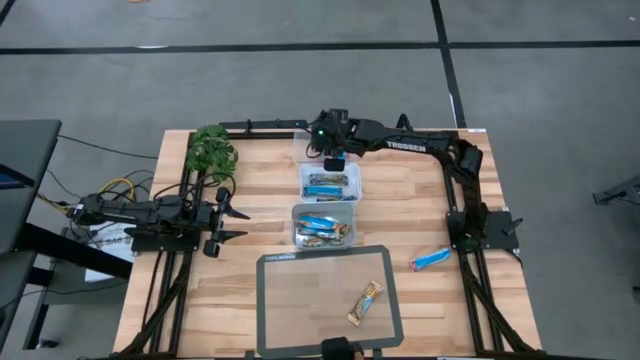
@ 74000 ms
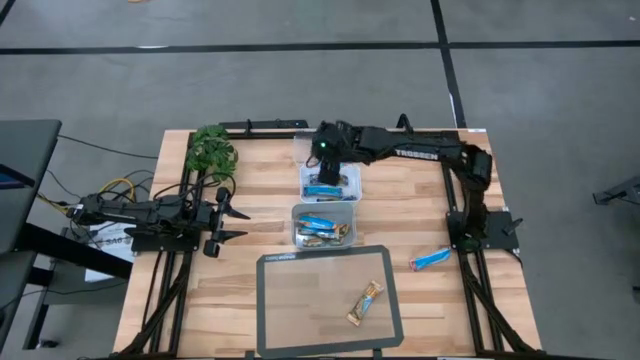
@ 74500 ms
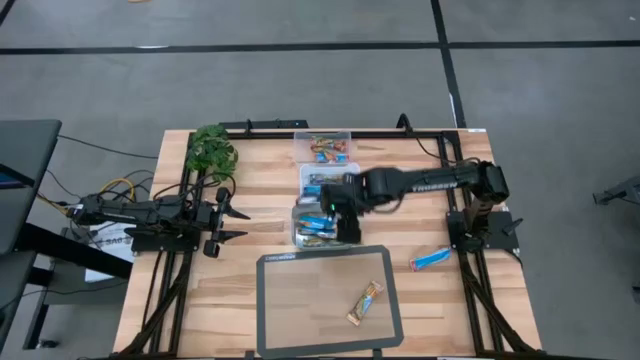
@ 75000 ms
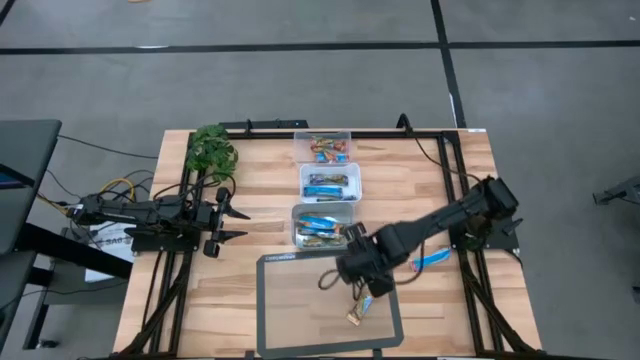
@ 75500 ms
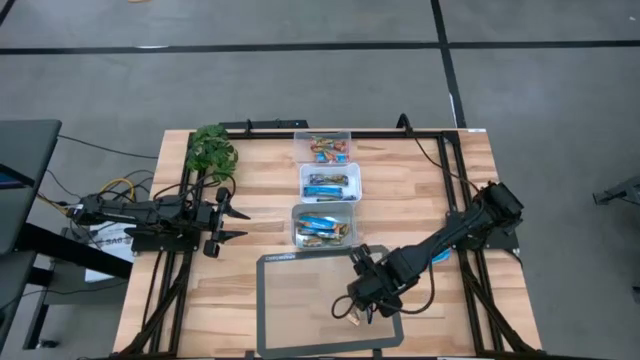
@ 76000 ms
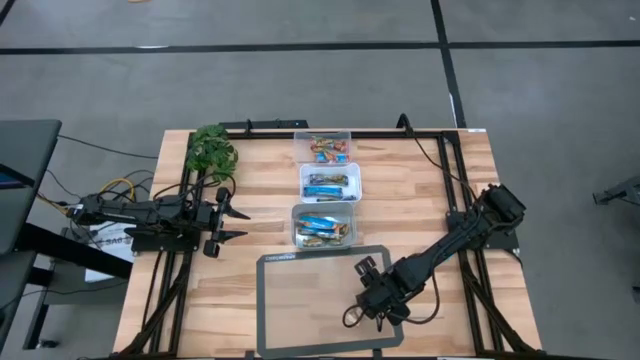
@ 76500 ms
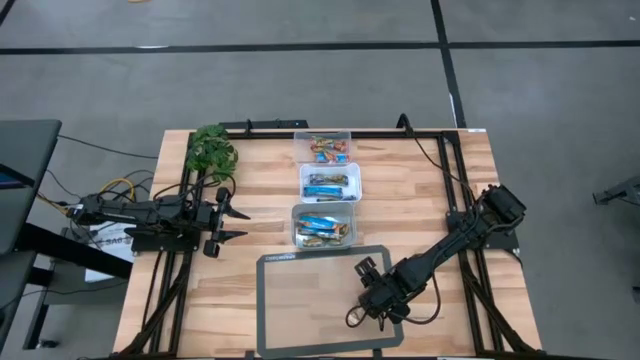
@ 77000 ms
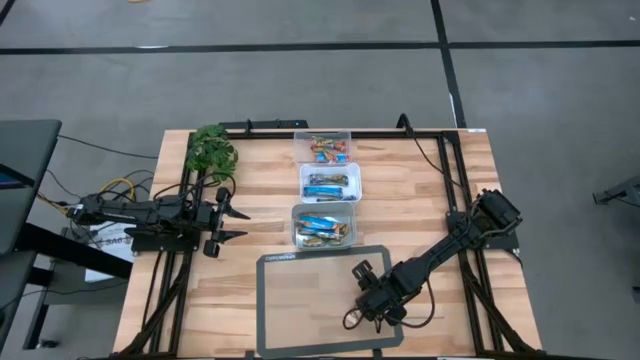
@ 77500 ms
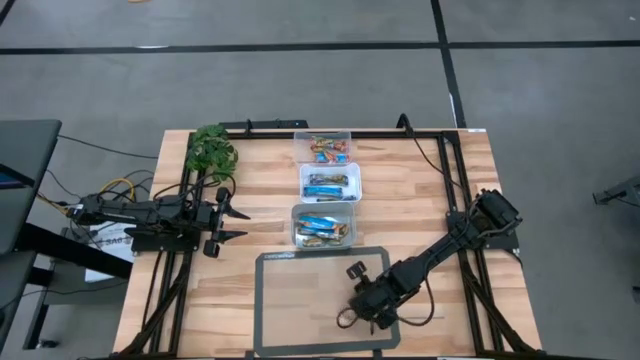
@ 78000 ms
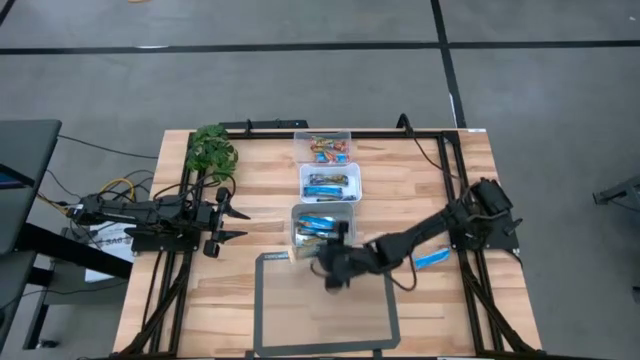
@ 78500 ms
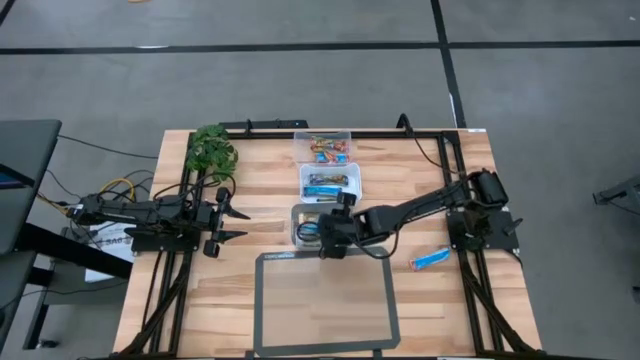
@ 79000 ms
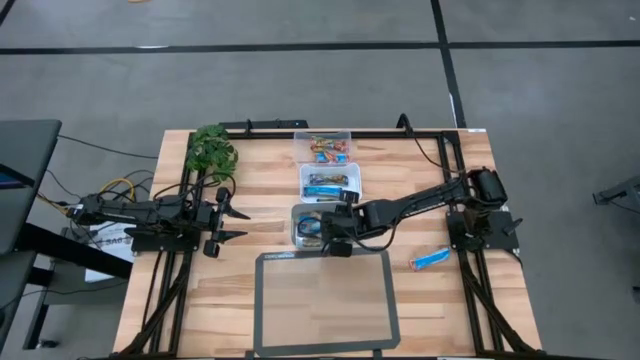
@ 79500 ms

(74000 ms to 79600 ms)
Task: Pick and place Granola Bars by type
Put the yellow granola bar into the gray bin

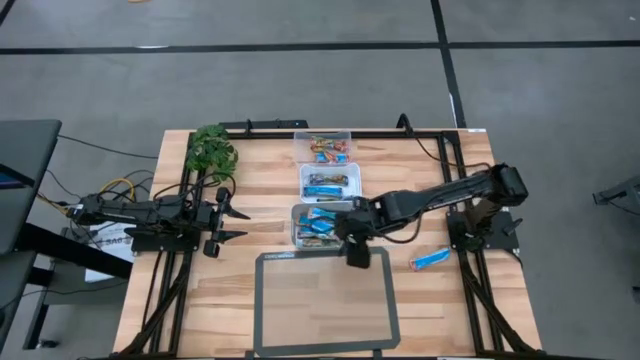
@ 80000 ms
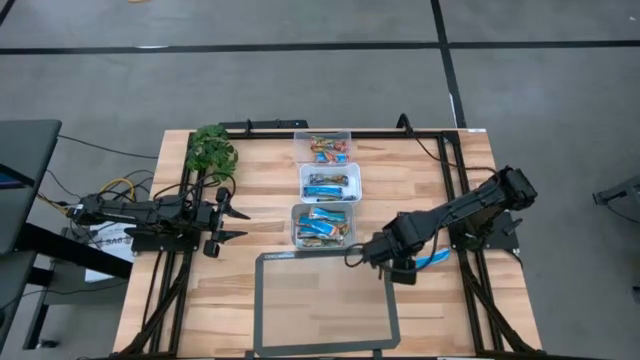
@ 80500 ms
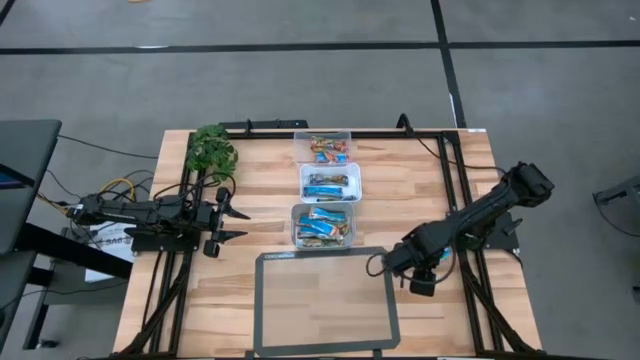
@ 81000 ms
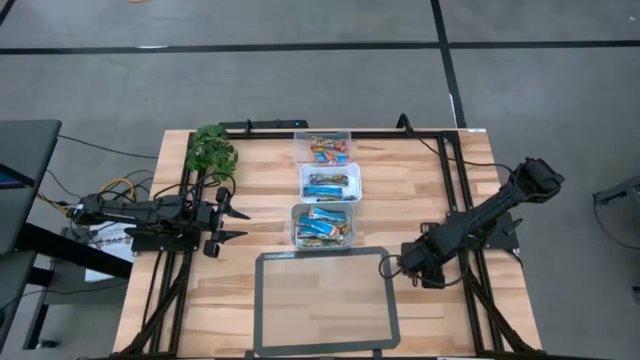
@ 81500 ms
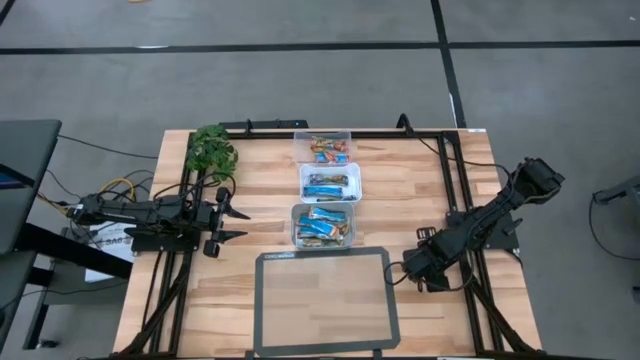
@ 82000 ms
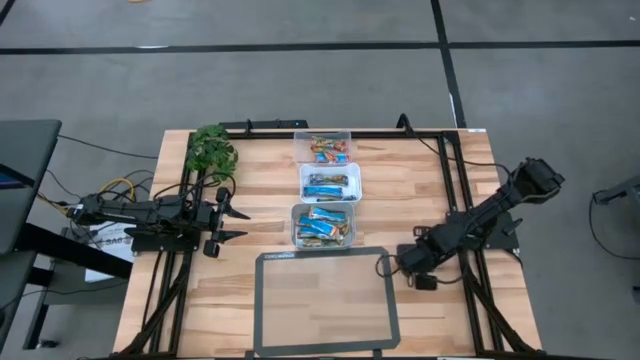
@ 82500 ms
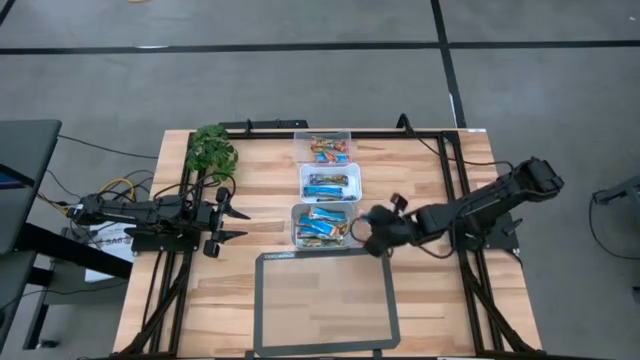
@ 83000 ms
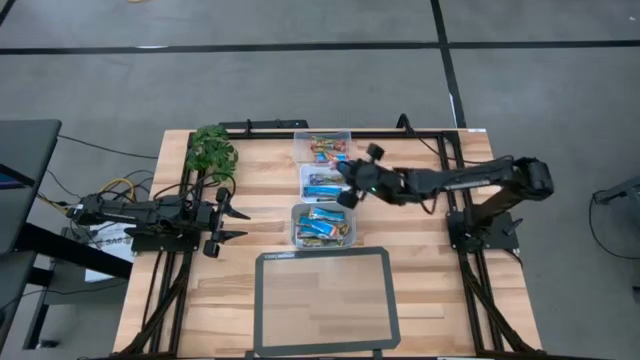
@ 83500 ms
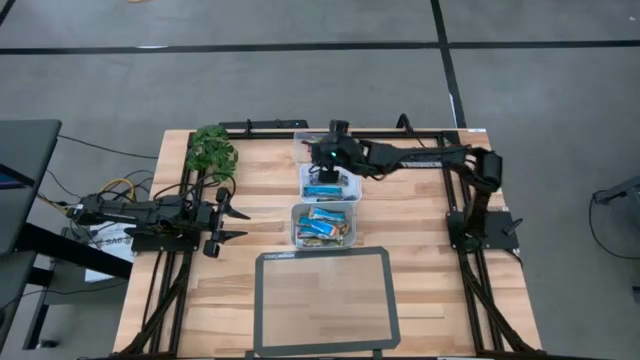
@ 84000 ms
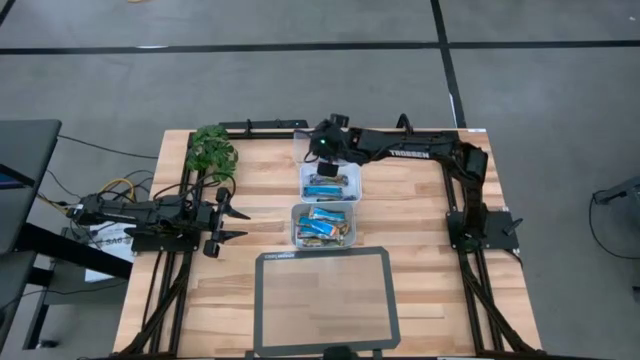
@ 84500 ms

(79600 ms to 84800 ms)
Put the red granola bar into the transparent bin

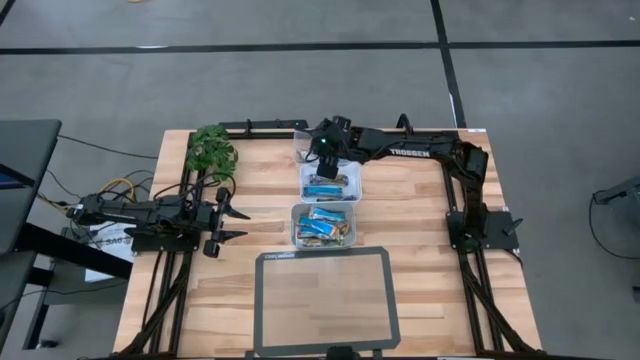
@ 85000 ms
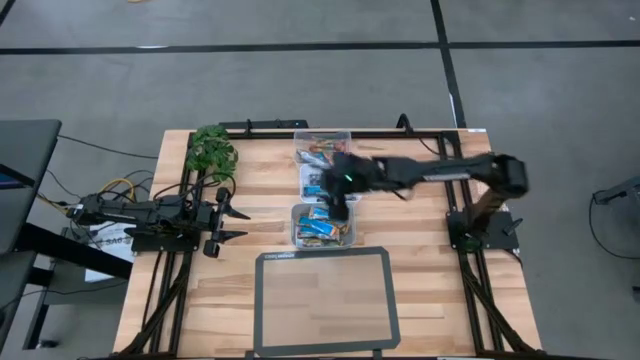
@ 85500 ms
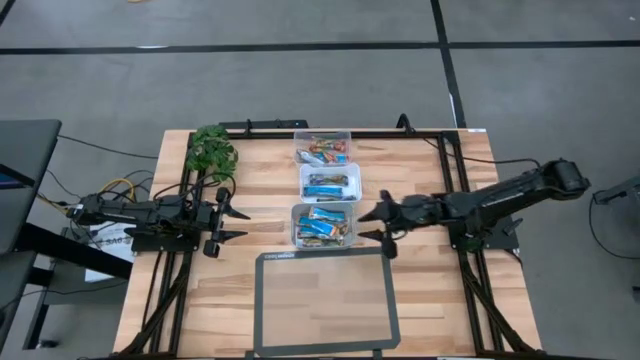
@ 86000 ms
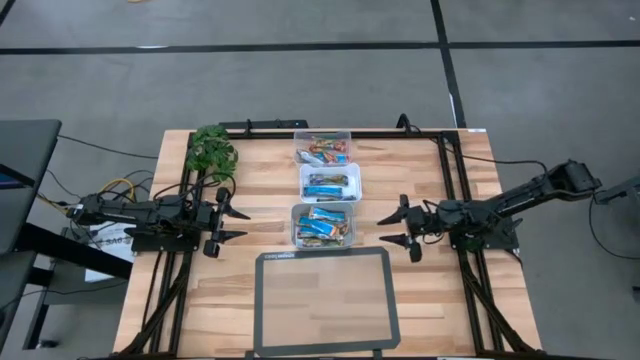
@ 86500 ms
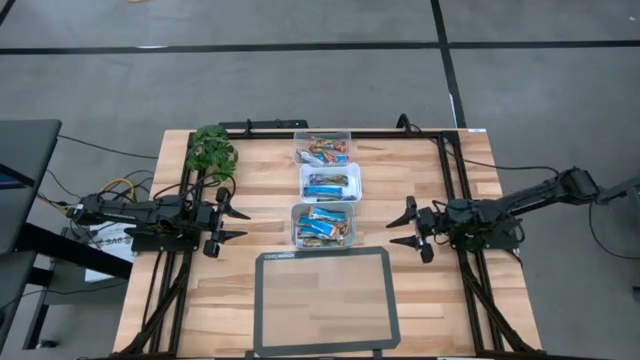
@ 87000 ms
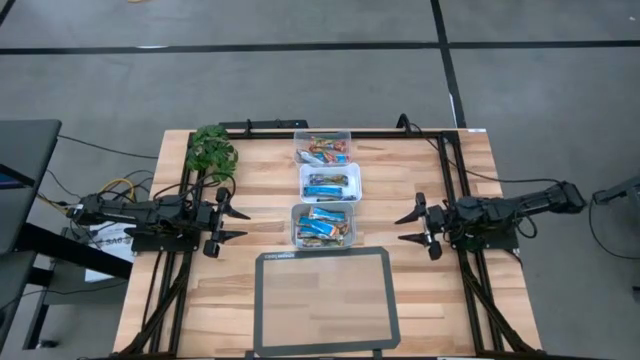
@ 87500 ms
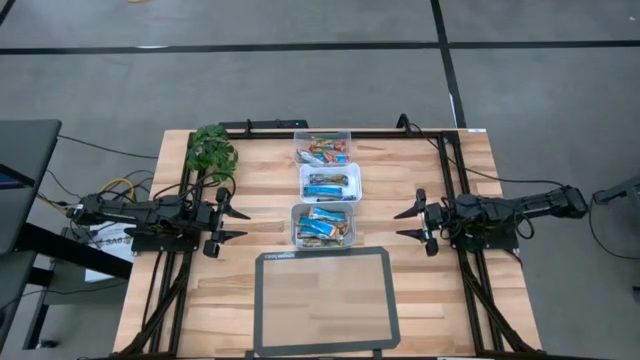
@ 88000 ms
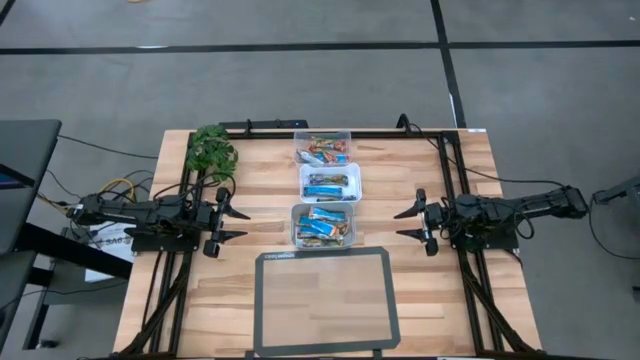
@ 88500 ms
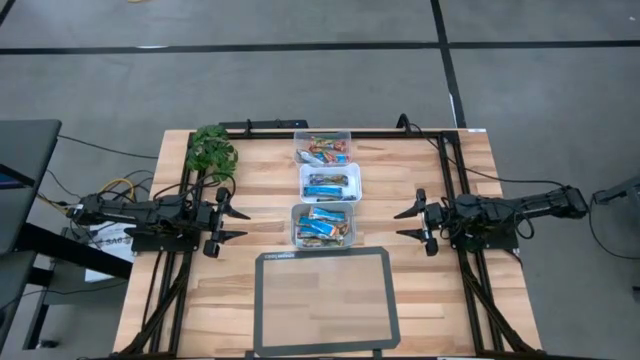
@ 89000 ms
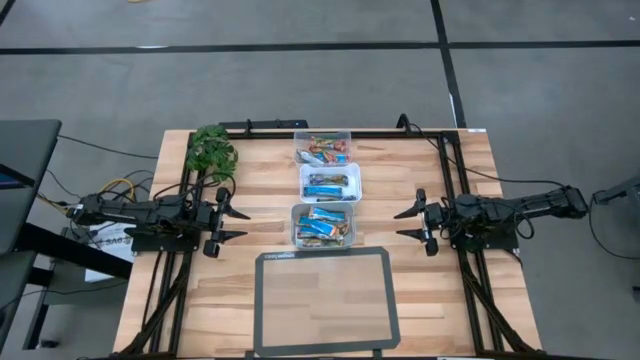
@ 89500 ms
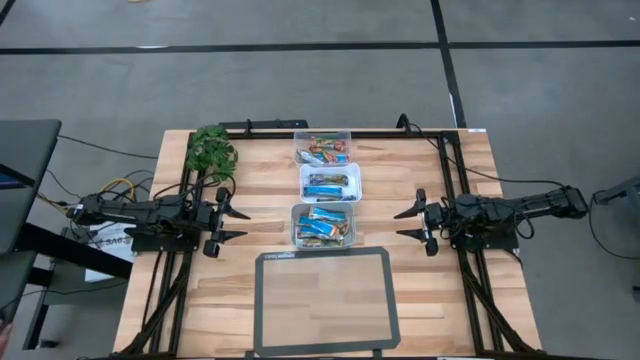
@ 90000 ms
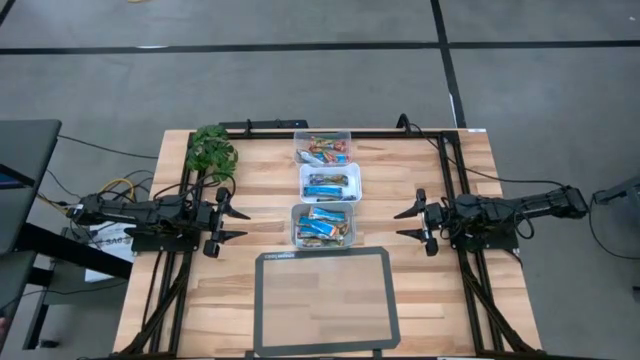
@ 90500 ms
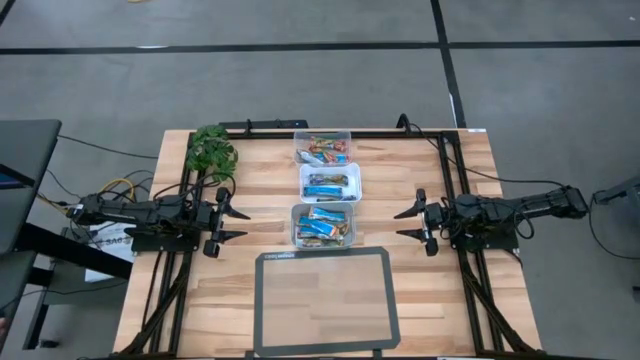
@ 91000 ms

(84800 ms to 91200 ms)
Return to Home Position

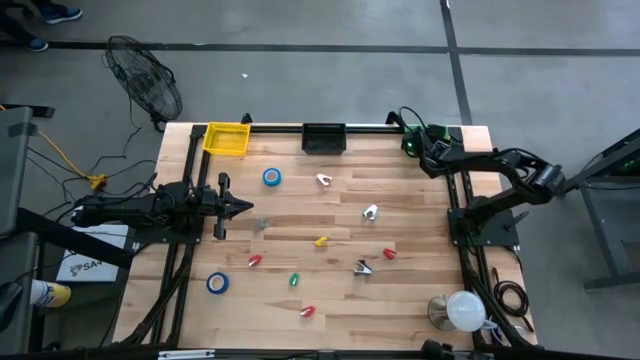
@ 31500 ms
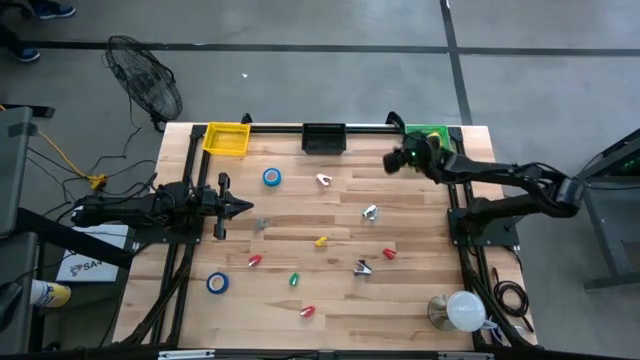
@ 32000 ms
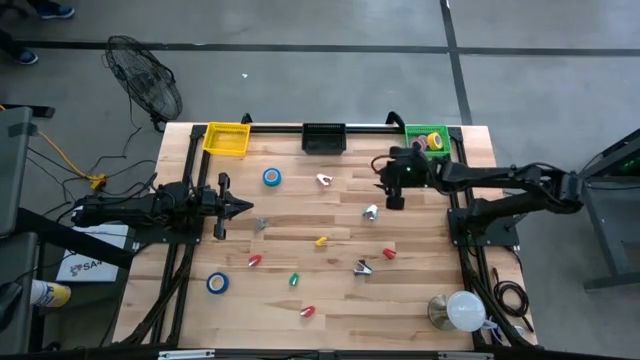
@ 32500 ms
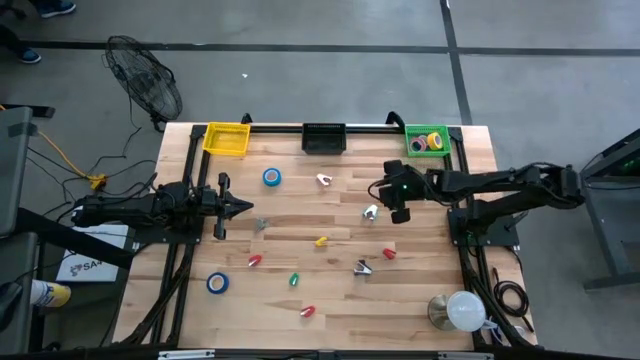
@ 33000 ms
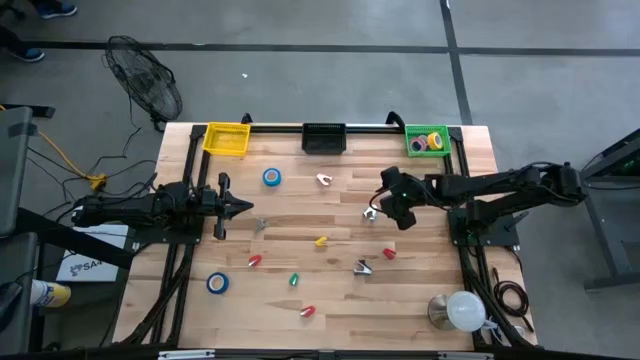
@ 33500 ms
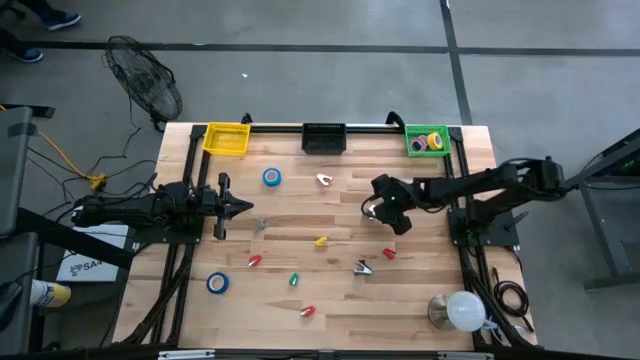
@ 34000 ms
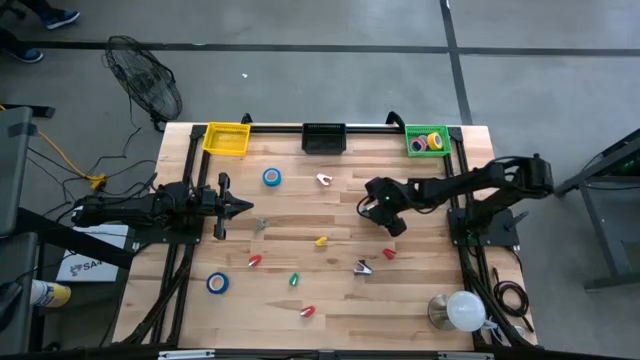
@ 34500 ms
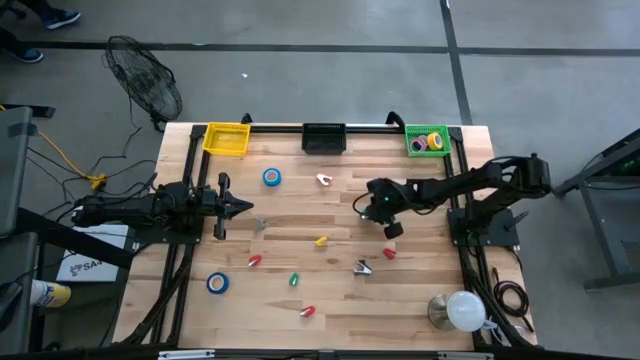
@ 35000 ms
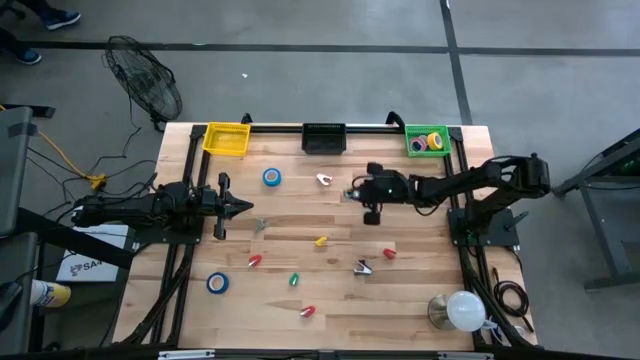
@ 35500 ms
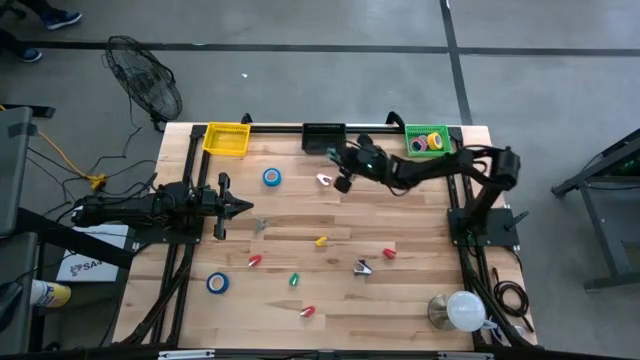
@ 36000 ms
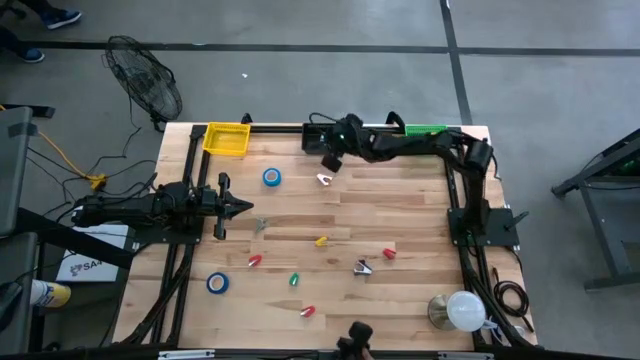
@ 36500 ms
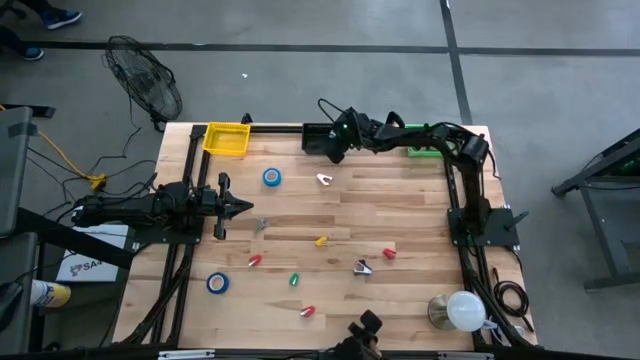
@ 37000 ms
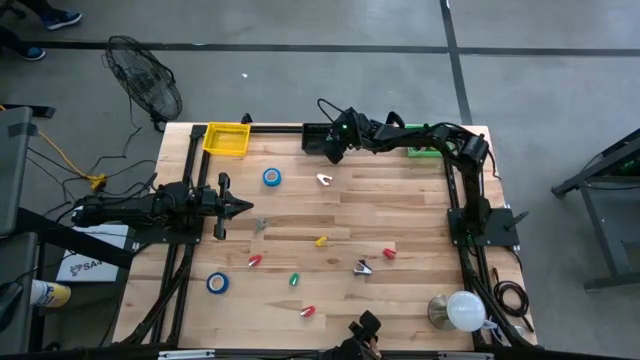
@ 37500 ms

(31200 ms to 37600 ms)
Task: Pick and place Stapler, Stapler remover, tape
Put the light blue staple remover into the black bin
